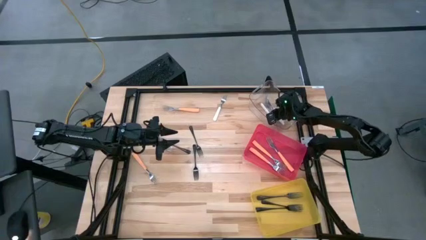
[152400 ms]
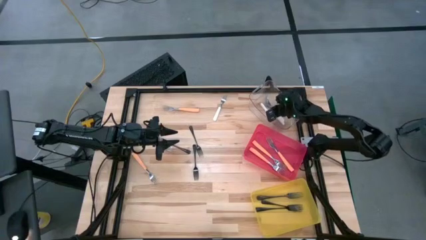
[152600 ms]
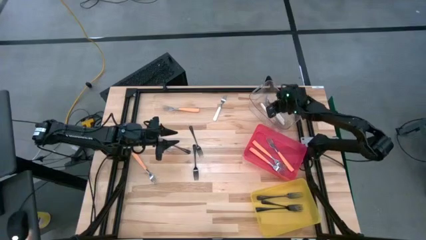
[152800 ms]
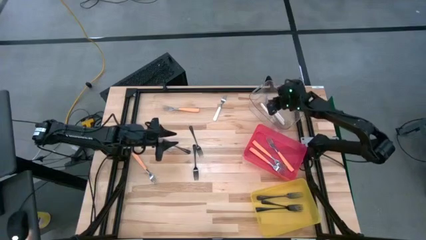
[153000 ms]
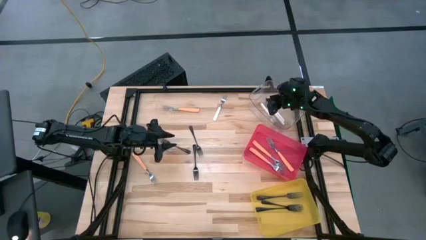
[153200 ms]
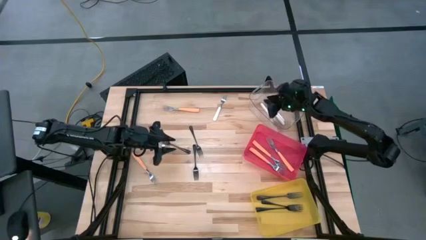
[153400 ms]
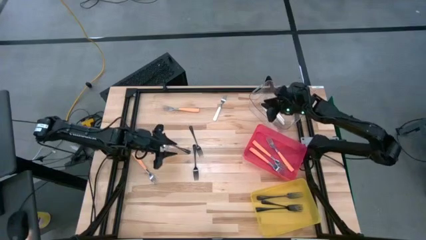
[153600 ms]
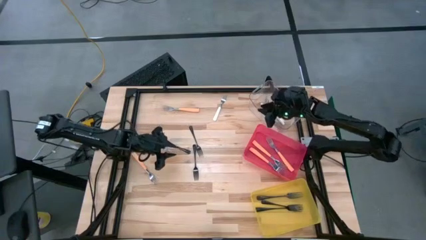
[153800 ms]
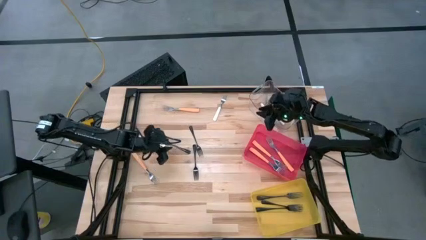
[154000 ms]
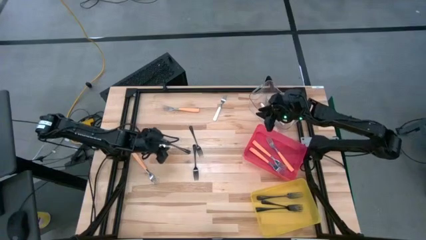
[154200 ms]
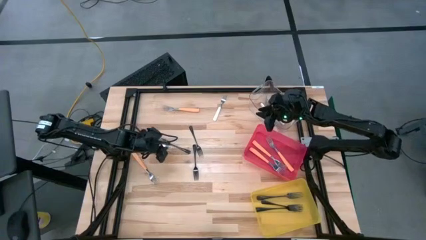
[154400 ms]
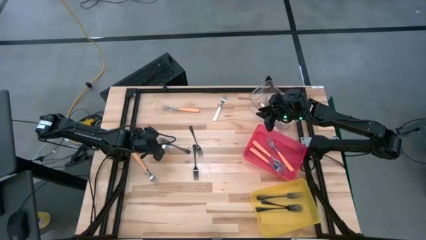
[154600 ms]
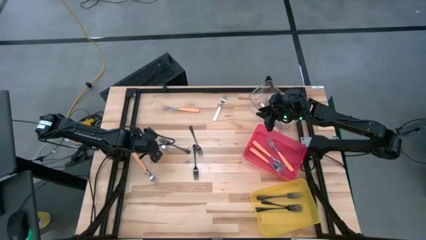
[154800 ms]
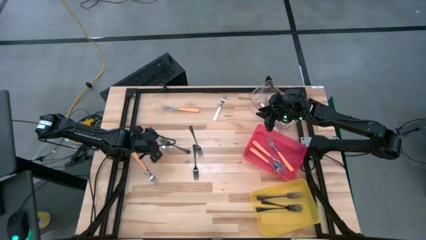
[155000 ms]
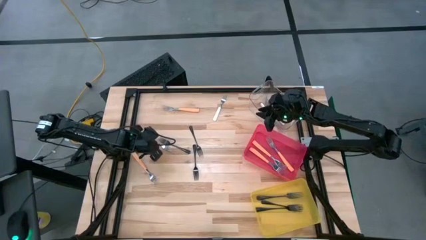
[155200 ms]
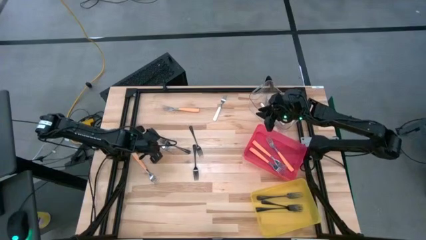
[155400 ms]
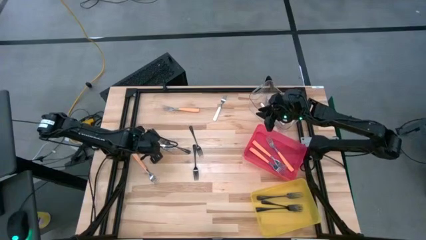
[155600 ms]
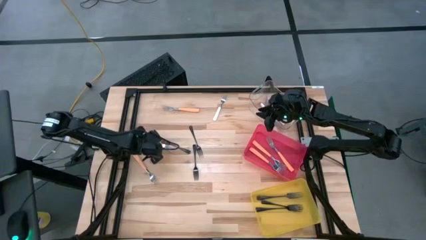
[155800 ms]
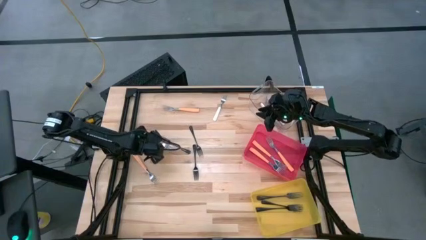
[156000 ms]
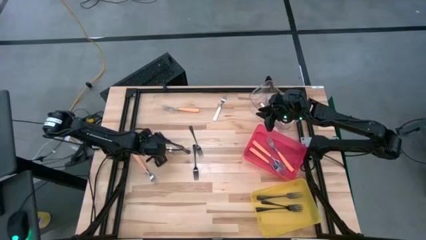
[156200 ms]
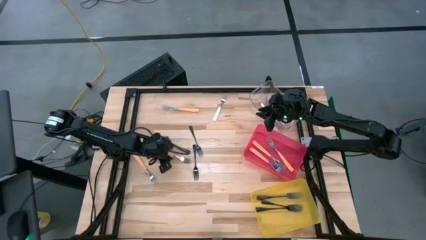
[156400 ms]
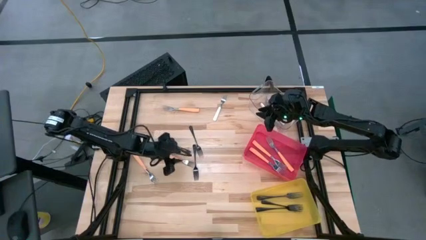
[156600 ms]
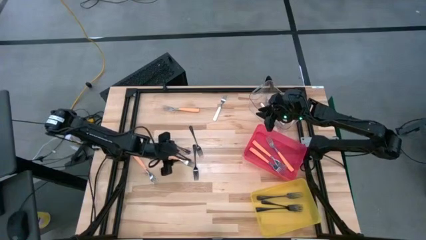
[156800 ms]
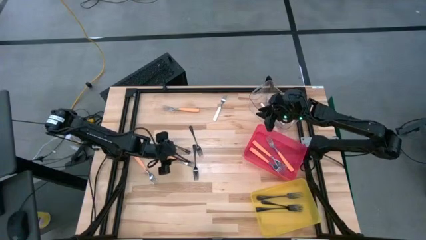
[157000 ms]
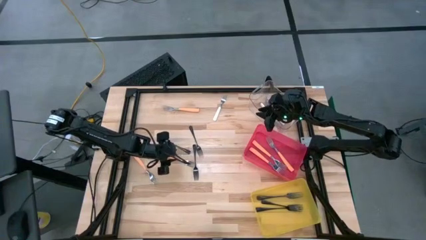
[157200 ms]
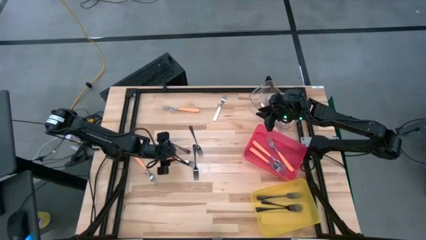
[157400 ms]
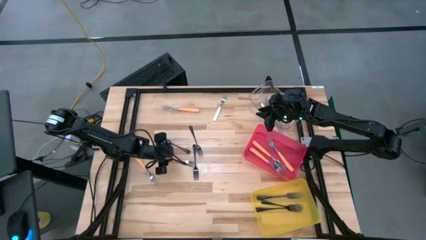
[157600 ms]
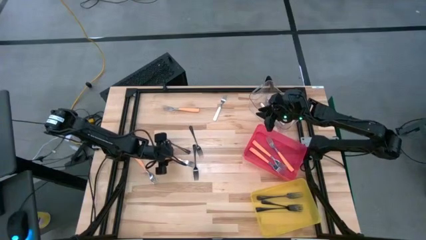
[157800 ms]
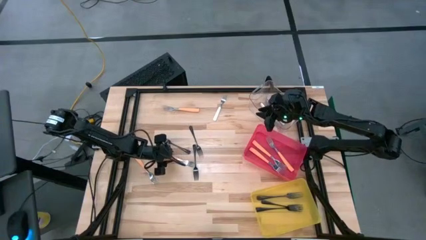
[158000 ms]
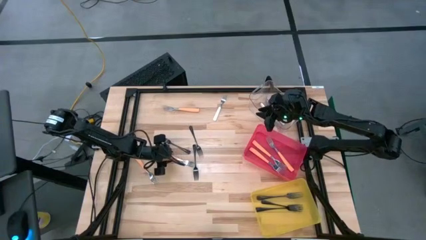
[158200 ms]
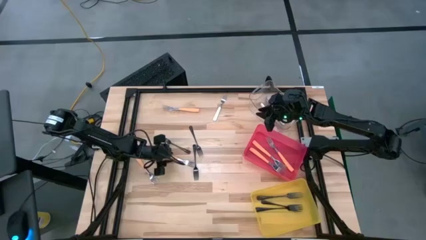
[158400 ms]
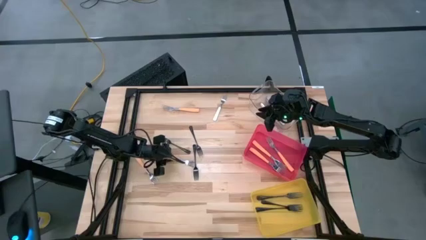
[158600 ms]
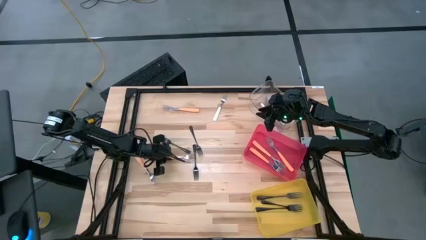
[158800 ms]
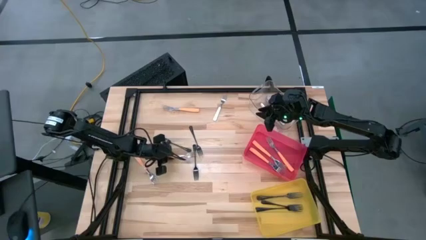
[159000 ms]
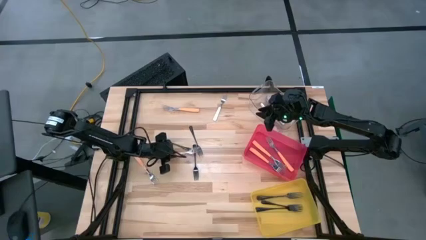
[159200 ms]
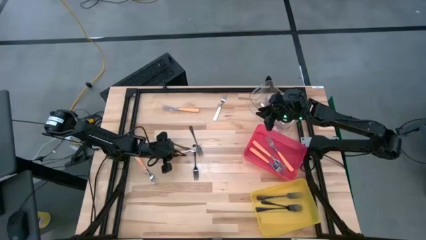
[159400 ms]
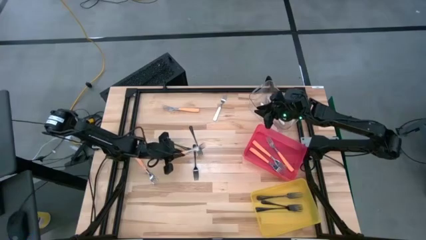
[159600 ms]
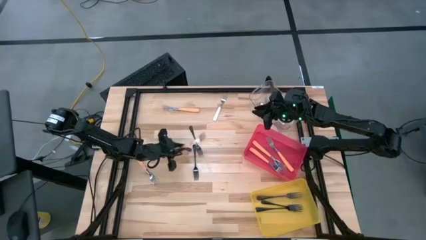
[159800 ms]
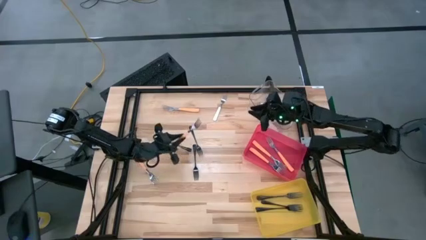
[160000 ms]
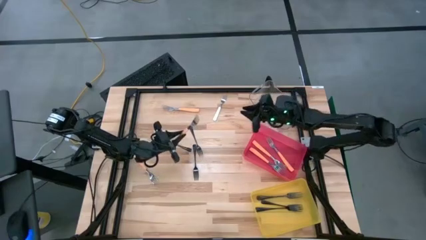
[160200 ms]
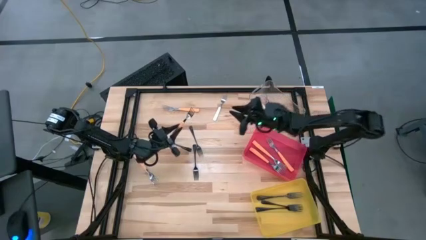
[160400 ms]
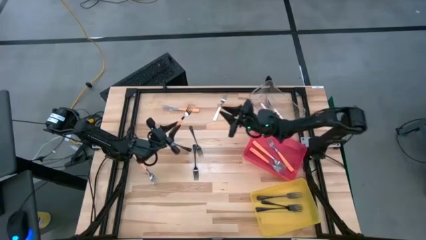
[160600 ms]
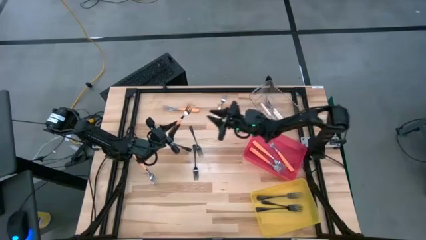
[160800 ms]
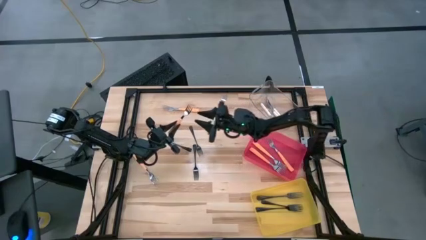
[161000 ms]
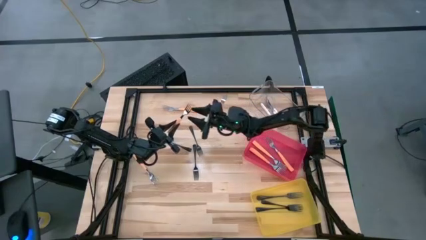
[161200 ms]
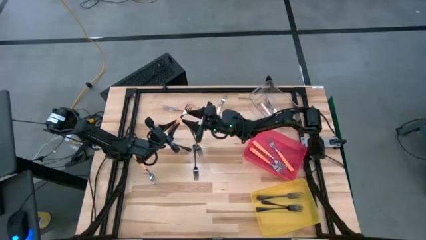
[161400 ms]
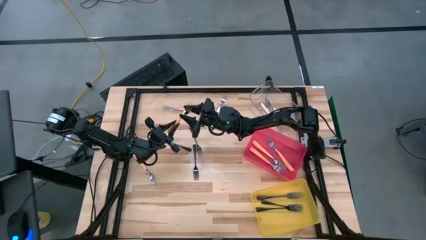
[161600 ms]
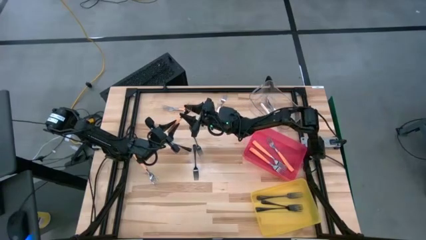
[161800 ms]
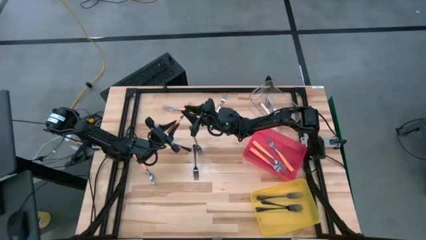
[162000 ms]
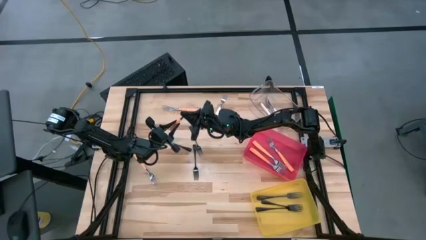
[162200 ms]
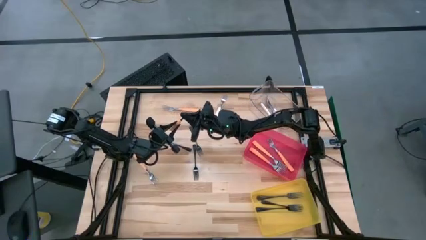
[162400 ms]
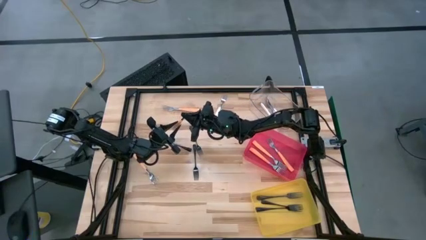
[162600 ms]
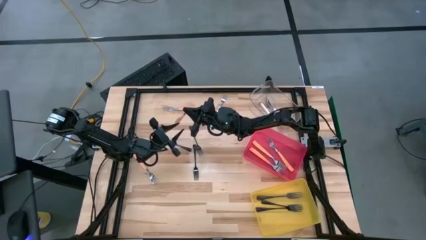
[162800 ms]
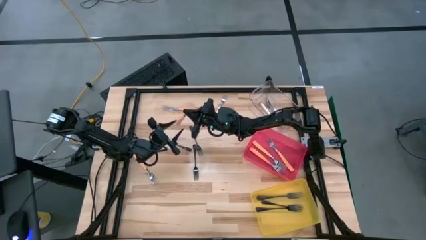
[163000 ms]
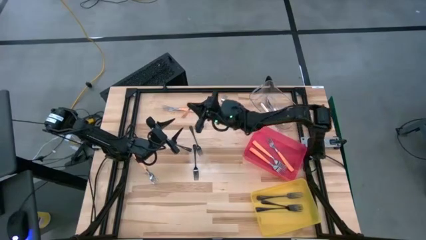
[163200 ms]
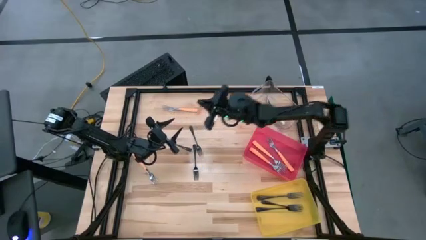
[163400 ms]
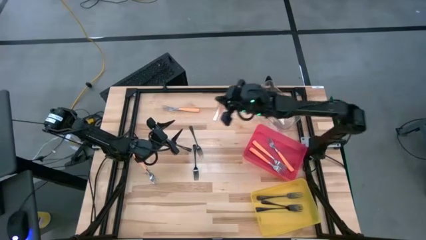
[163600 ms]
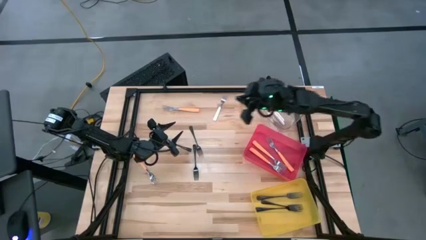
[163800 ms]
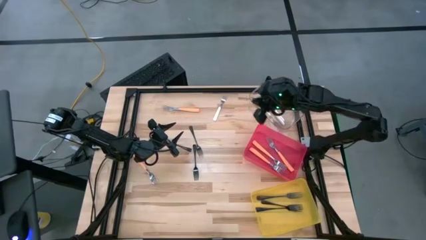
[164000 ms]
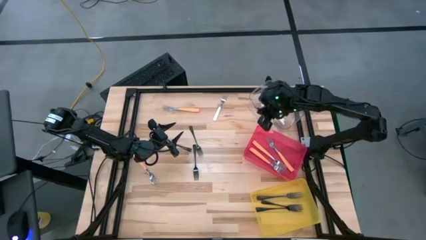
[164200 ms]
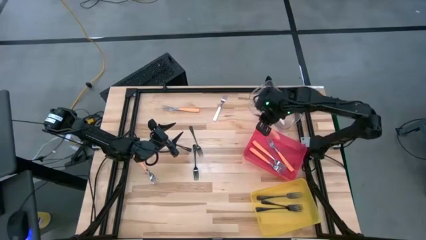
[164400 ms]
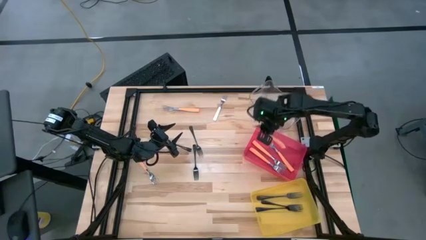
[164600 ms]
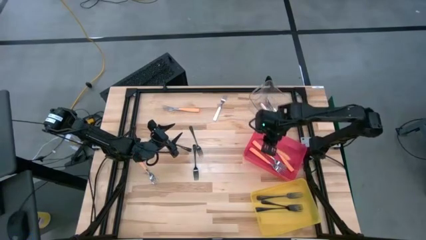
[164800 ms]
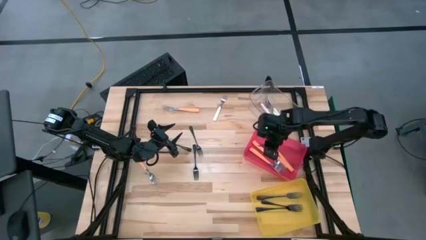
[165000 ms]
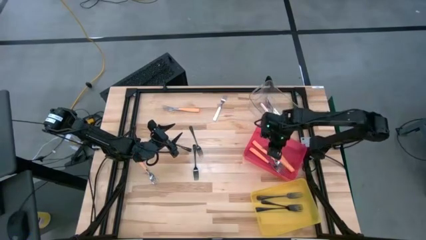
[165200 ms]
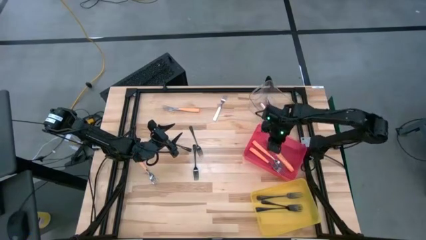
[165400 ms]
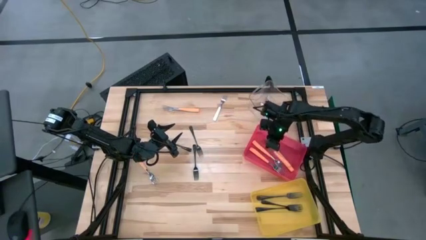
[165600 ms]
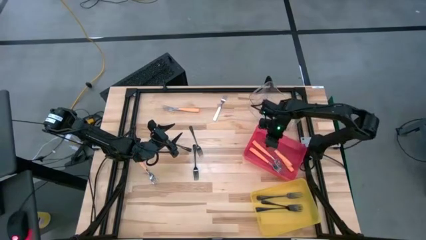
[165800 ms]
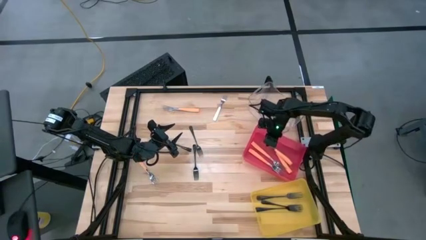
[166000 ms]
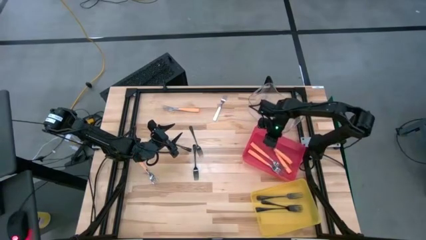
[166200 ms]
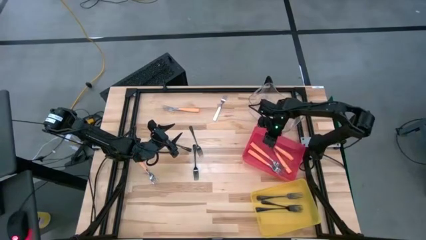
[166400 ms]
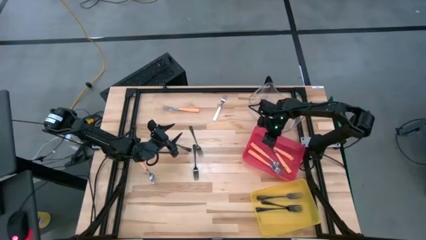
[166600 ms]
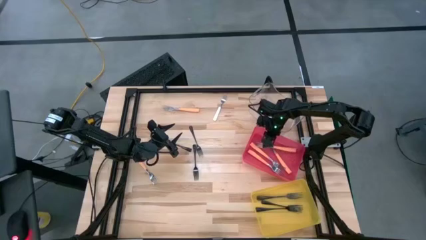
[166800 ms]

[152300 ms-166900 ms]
Task: Sort silverware by color (type)
Put the orange fork into the red bin

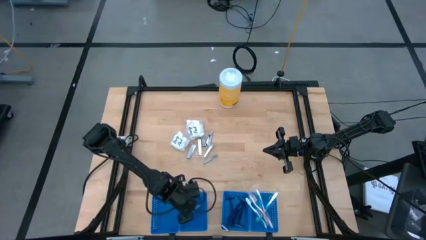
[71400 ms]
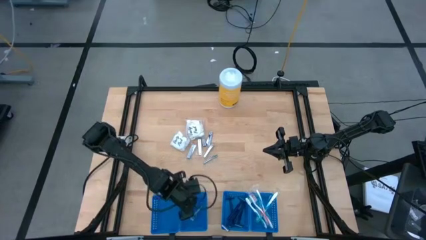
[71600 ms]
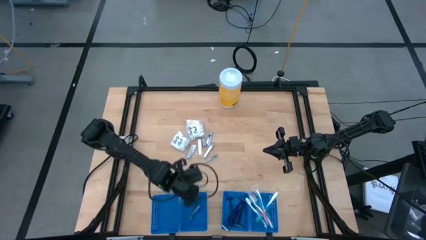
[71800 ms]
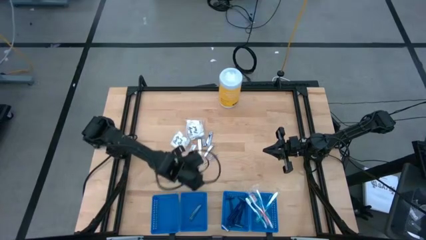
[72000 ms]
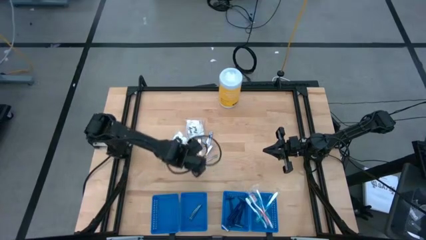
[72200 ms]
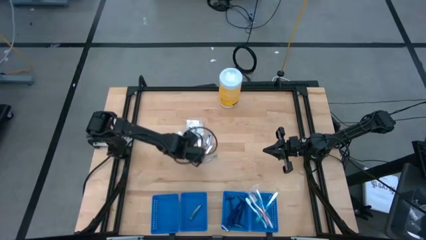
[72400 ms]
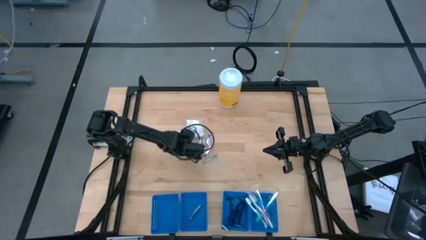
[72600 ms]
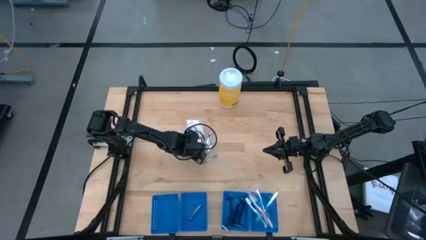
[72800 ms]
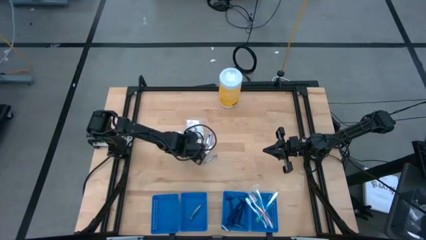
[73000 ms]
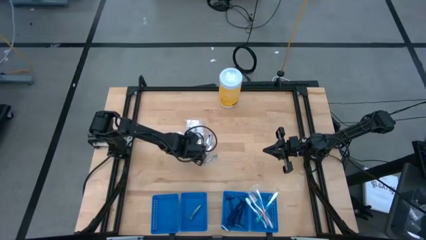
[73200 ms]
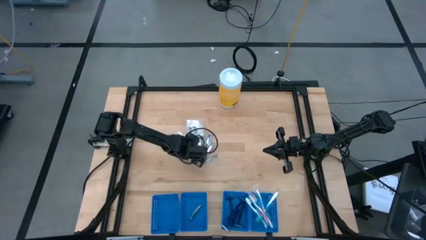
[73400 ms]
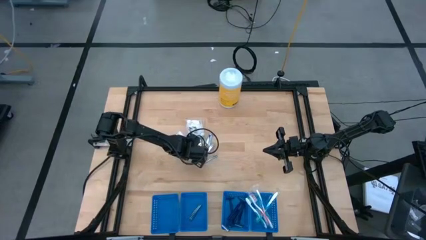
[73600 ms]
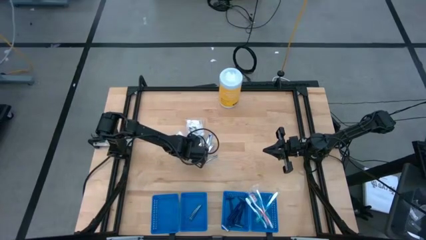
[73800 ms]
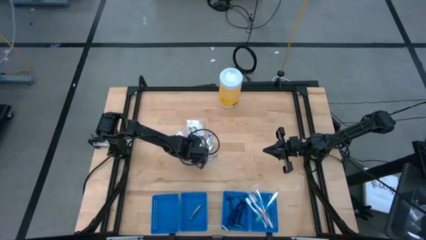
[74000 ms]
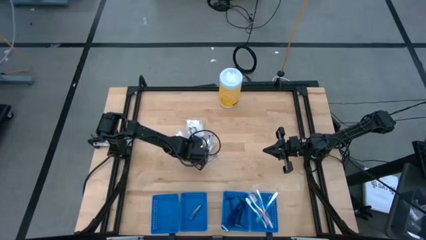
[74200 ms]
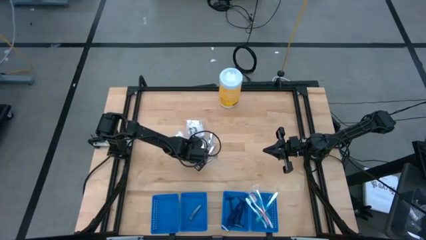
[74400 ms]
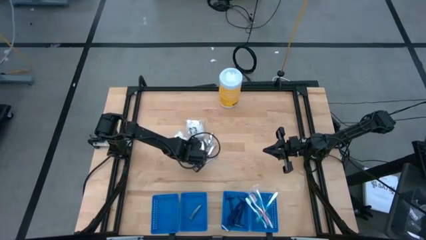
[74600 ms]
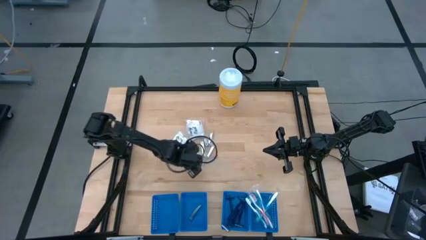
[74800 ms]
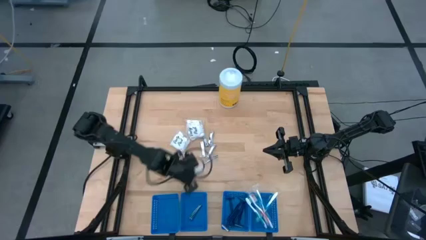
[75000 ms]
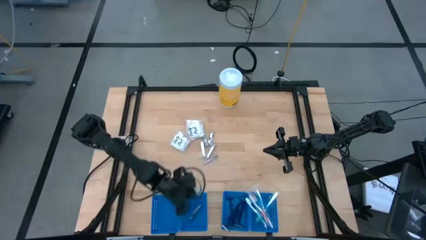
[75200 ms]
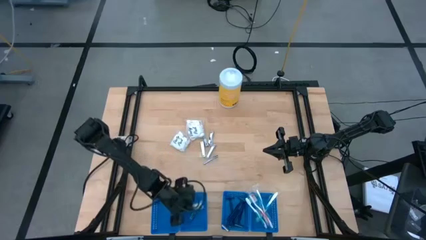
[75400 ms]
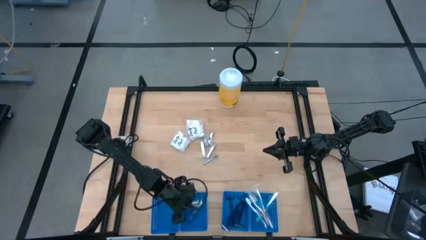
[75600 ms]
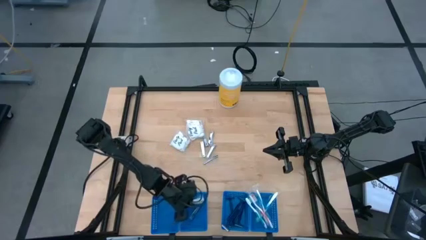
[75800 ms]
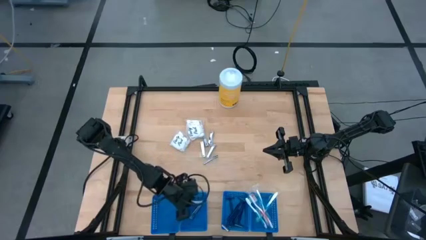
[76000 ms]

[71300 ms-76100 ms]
Task: Pick & Place Travel size toiletries
Put the silver nail cutter into the blue basket
